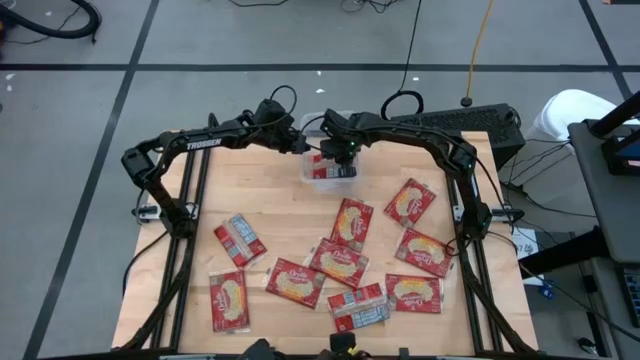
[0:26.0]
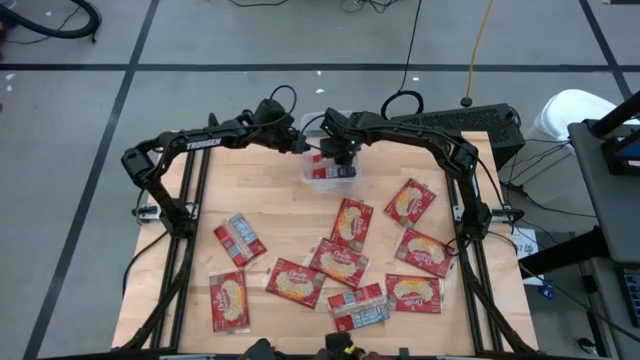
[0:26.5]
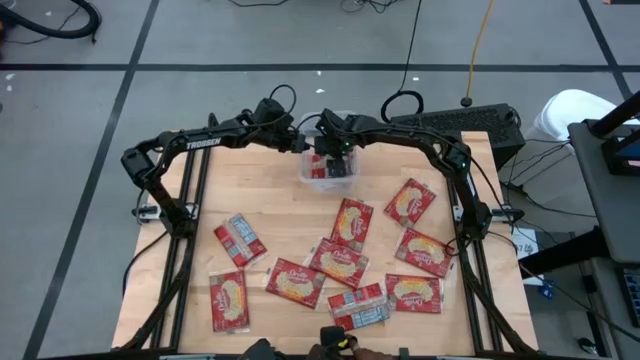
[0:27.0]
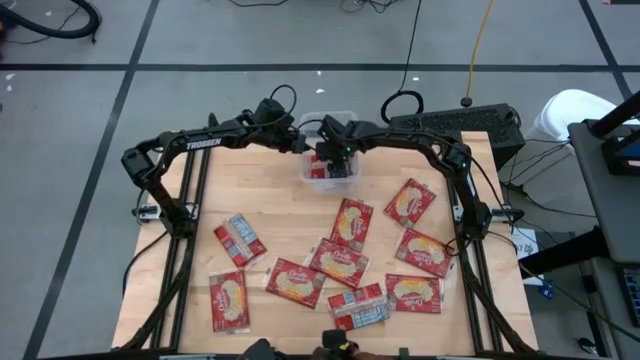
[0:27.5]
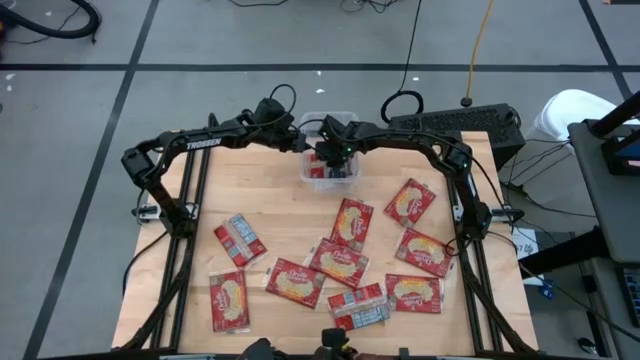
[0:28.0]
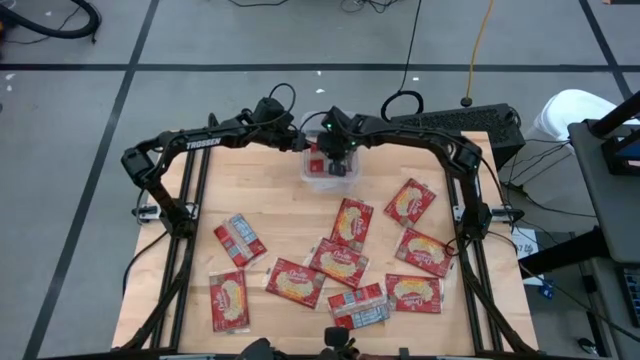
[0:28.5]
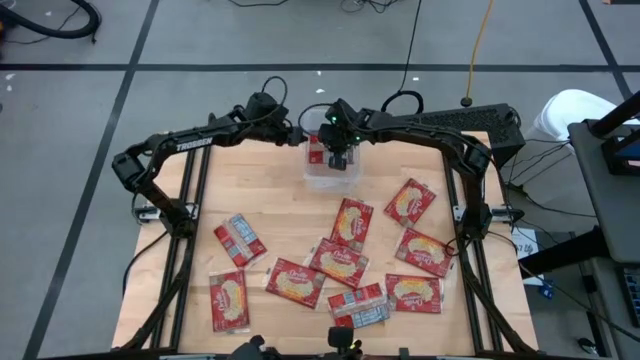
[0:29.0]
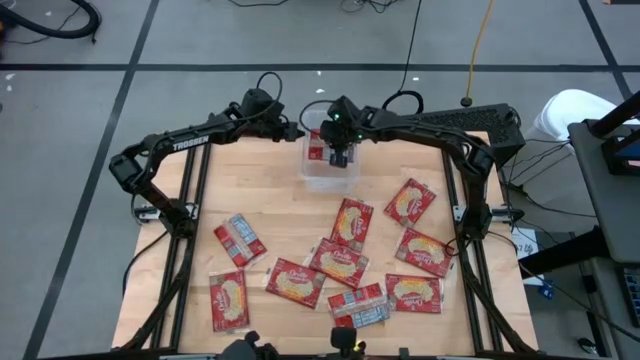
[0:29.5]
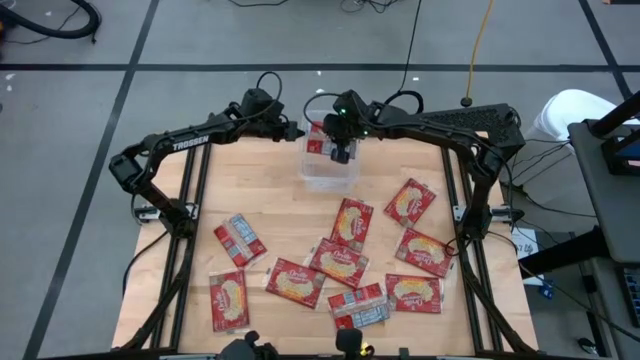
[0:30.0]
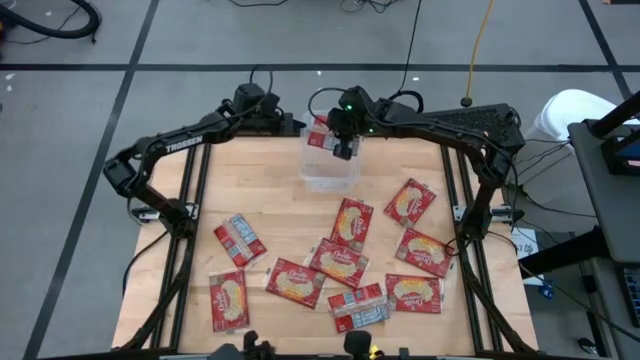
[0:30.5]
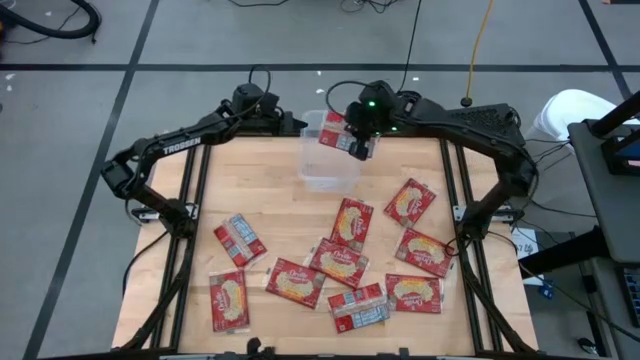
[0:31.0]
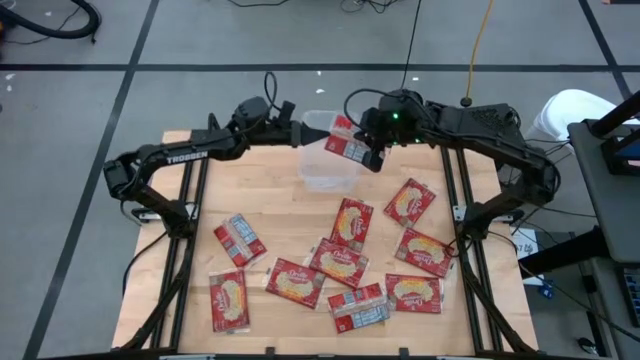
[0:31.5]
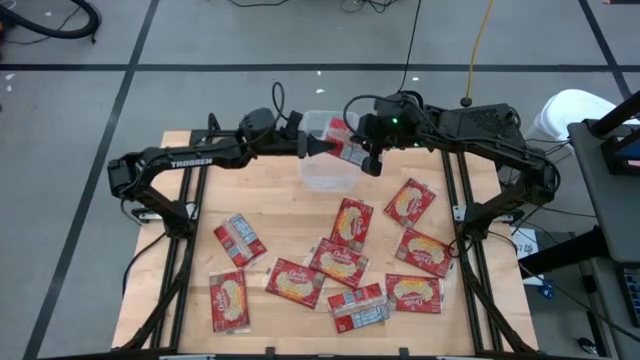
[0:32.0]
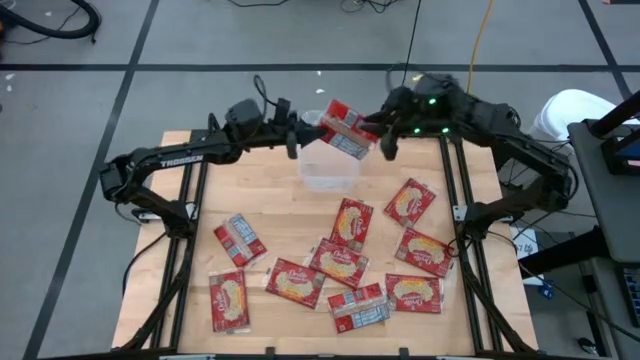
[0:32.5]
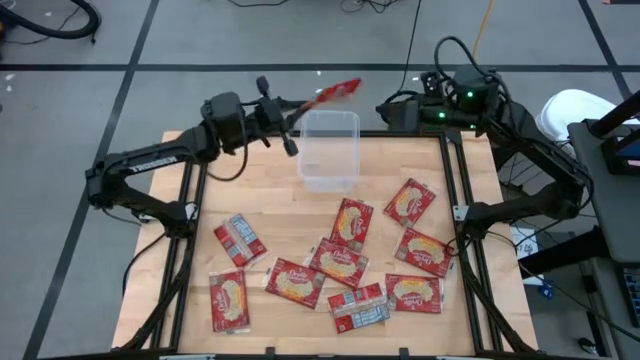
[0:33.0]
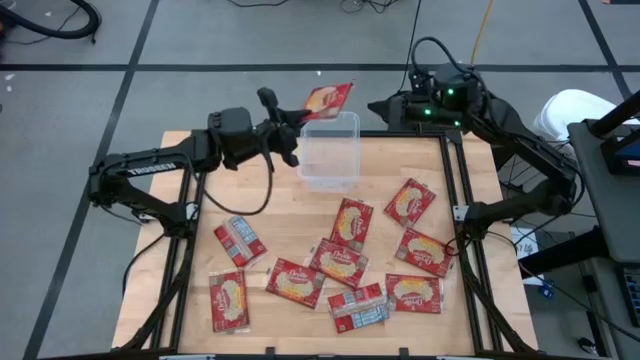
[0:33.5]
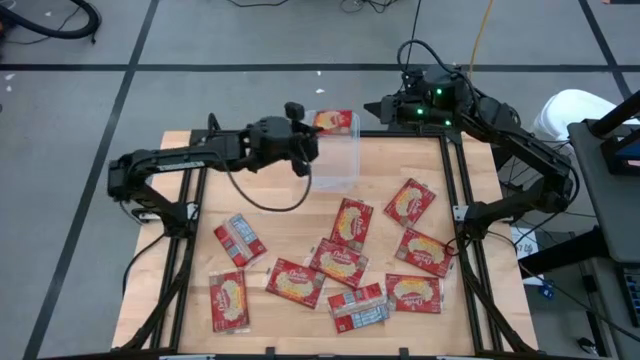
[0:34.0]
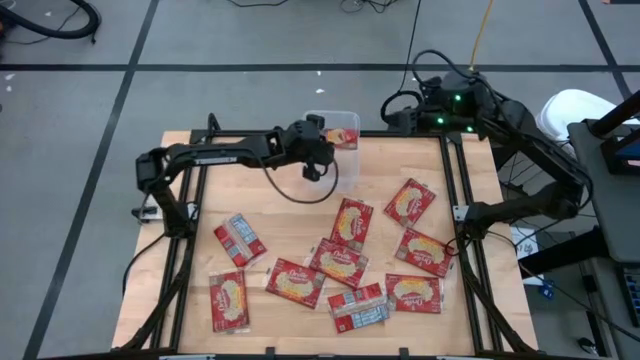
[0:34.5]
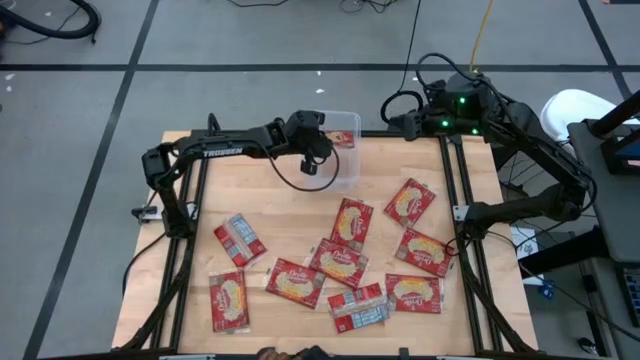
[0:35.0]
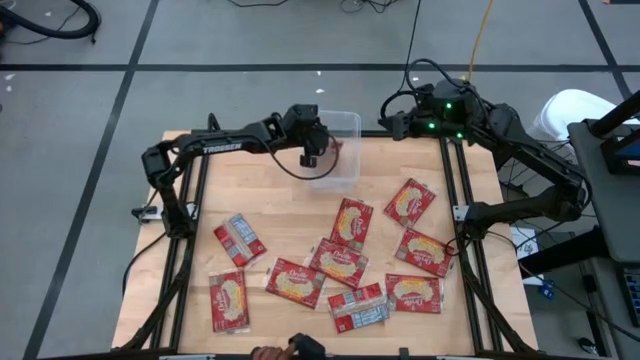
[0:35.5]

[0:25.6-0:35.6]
Task: Sort popcorn bags into baskets
Put the red popcorn bag into the transparent container

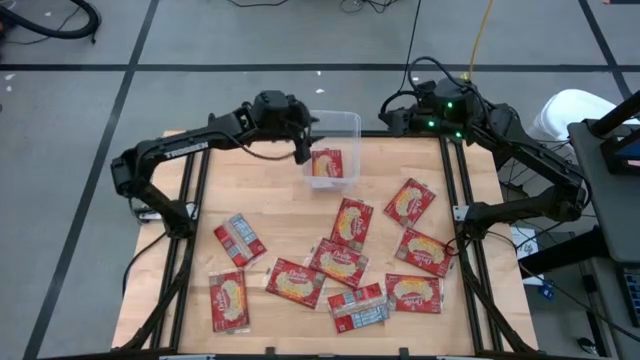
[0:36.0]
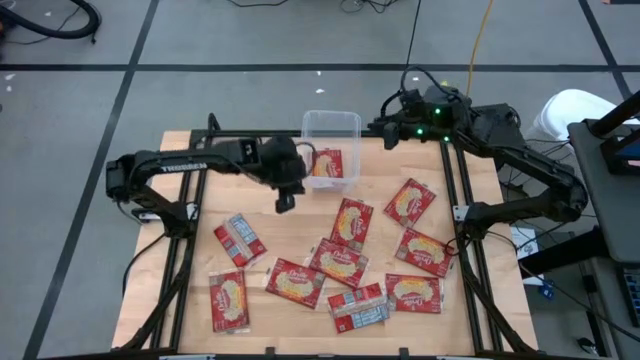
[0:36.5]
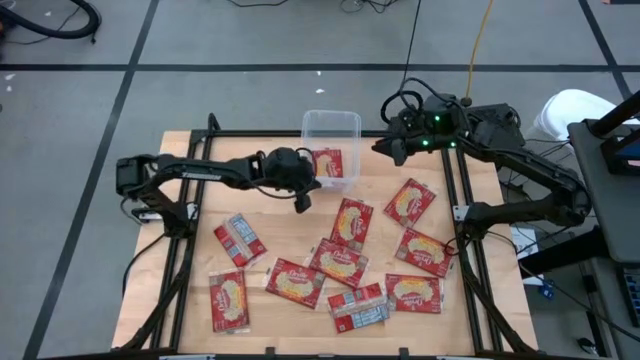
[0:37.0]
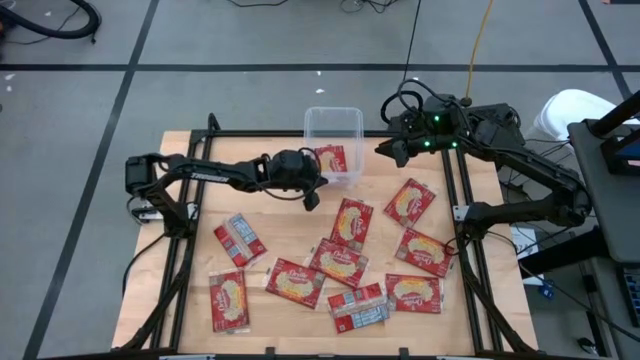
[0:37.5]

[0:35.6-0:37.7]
Adjust the transparent container

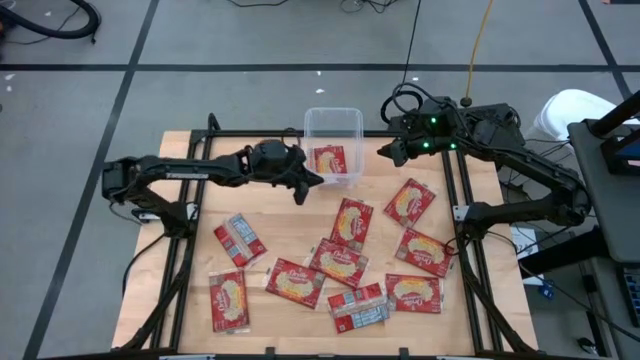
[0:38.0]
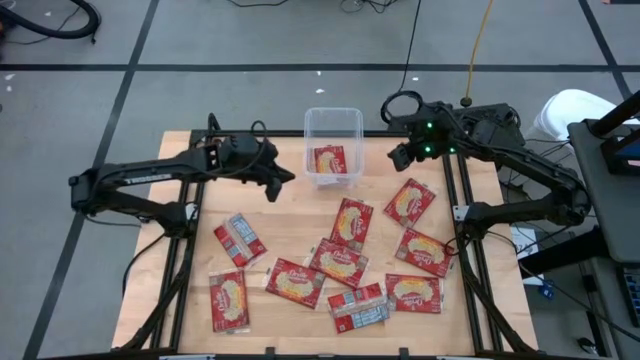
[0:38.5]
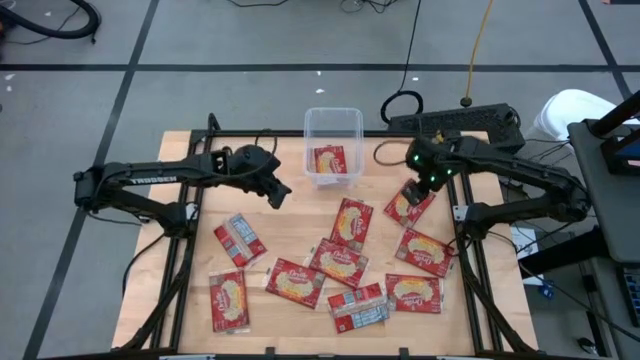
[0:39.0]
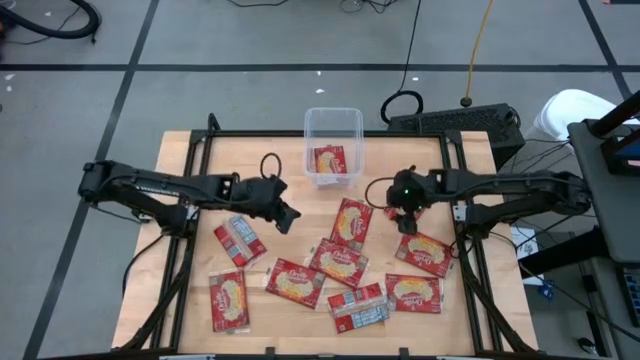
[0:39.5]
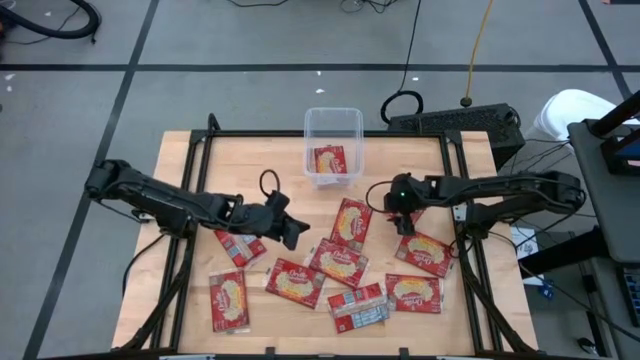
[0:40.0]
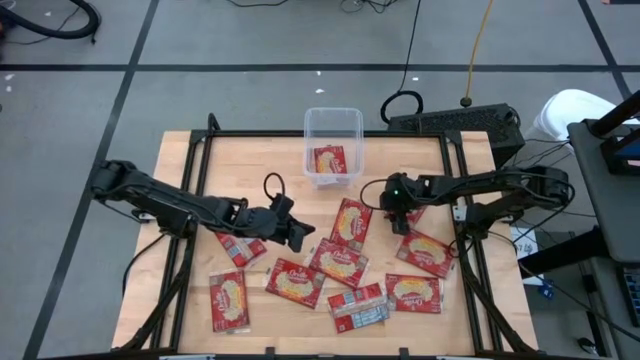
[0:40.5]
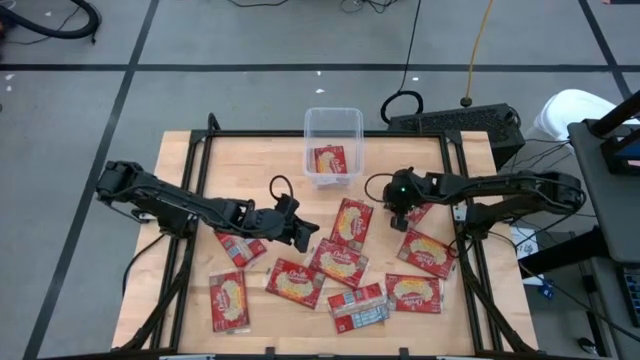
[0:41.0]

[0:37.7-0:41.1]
Put the red popcorn bag into the transparent container

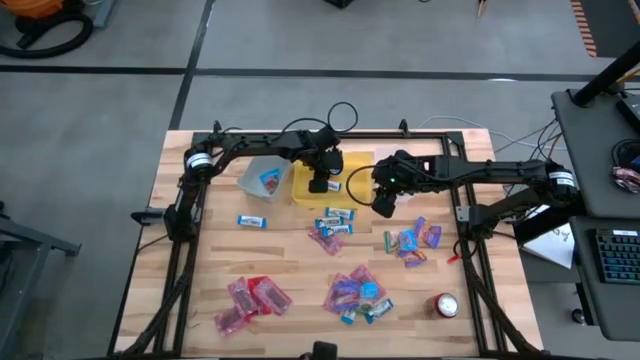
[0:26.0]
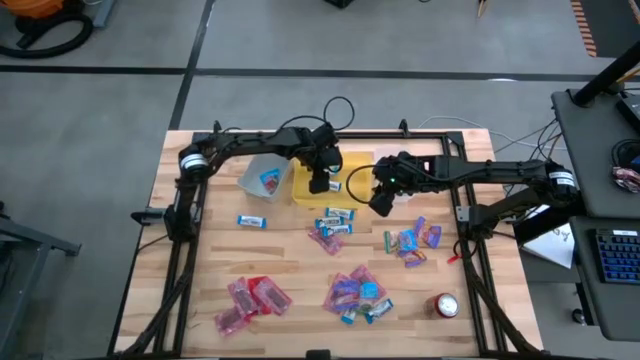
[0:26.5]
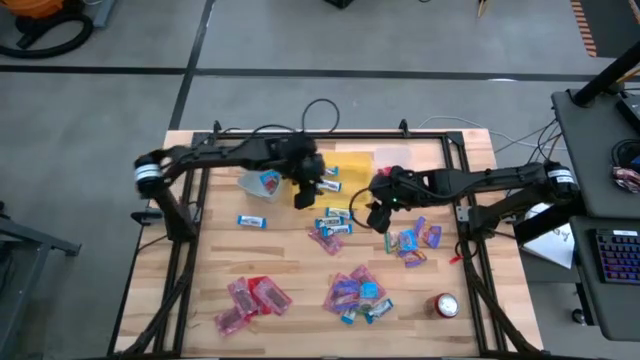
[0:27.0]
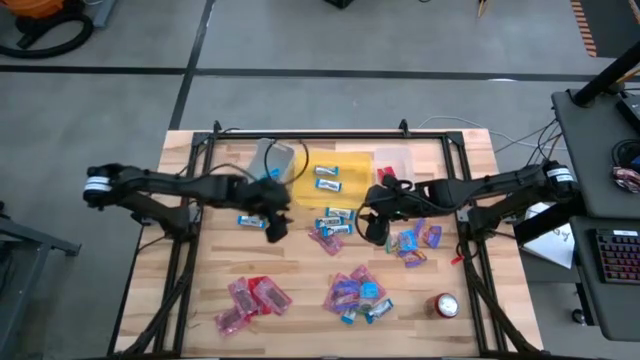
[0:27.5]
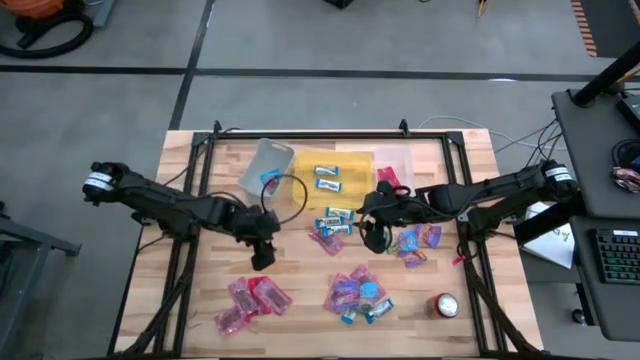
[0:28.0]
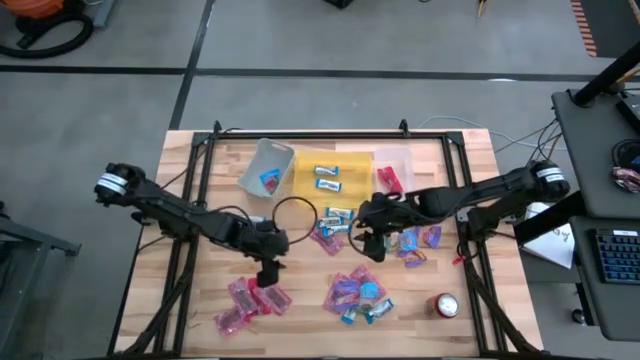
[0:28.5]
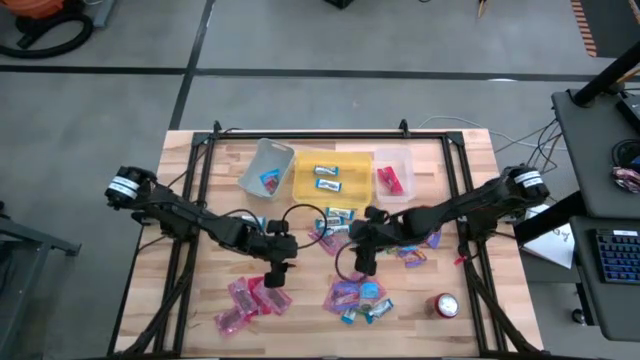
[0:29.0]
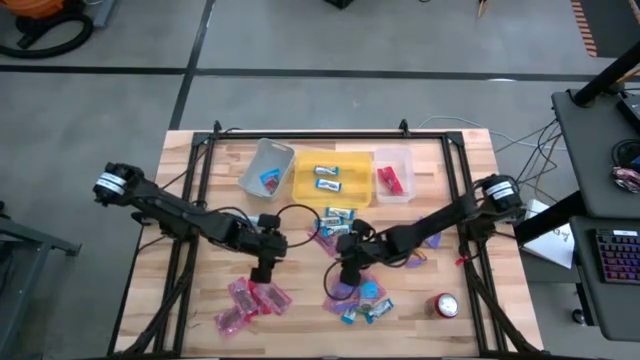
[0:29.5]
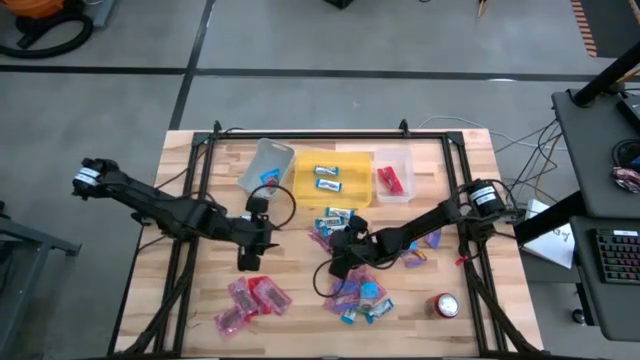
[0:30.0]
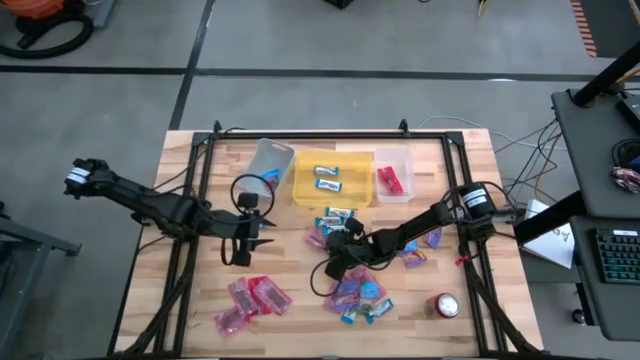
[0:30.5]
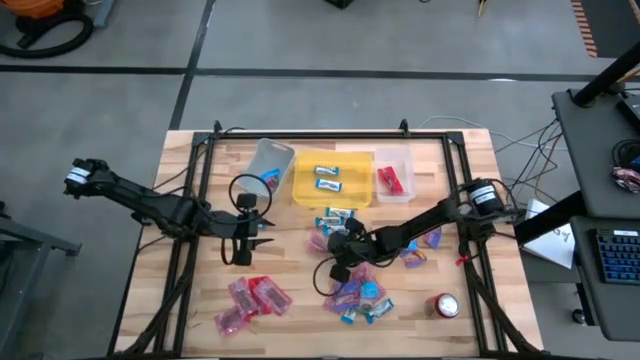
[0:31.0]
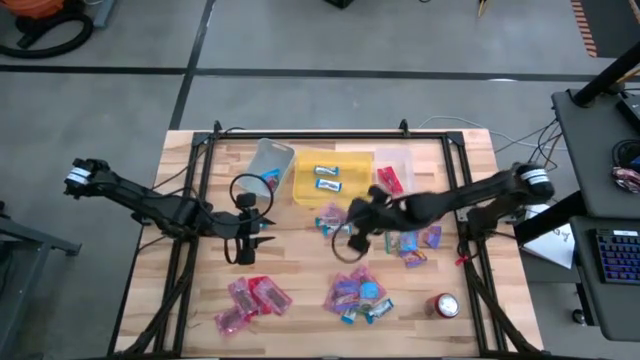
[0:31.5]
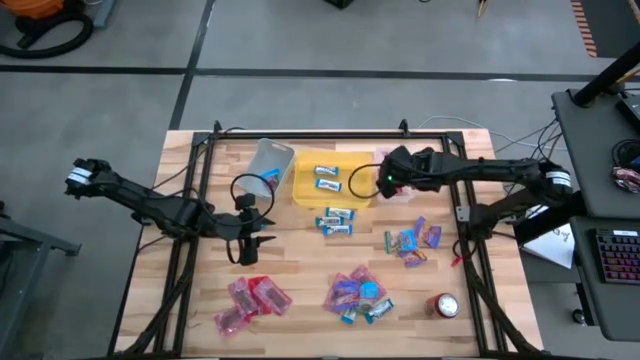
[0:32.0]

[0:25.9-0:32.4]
Task: Sort candy
Put the red candy into the transparent bin
